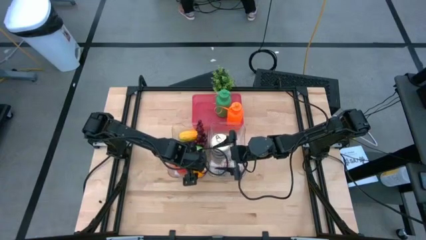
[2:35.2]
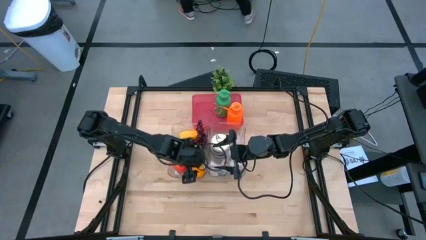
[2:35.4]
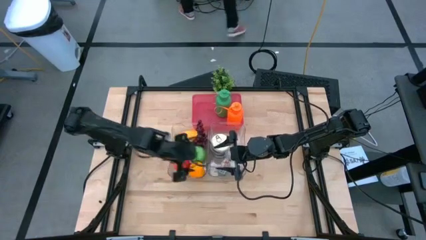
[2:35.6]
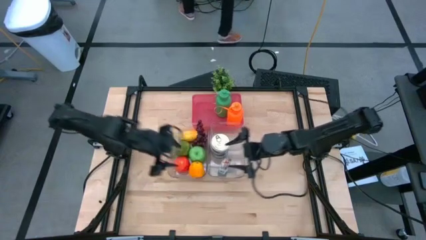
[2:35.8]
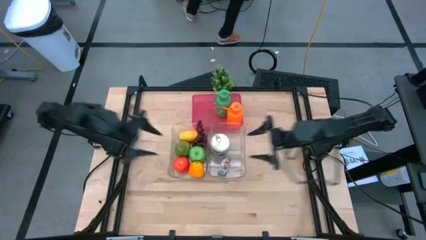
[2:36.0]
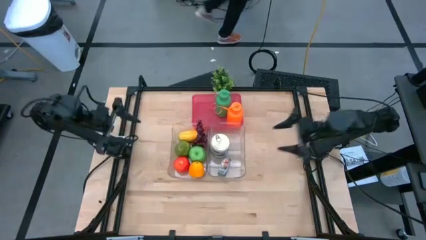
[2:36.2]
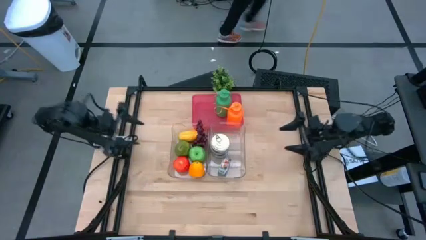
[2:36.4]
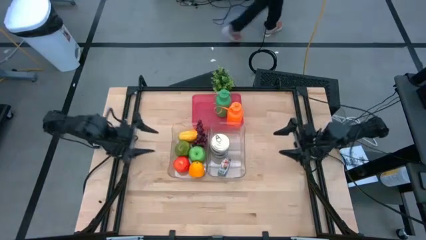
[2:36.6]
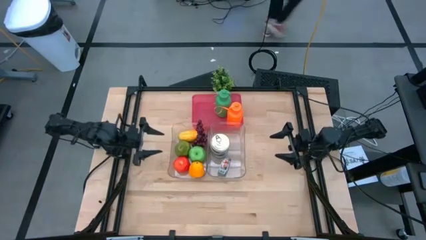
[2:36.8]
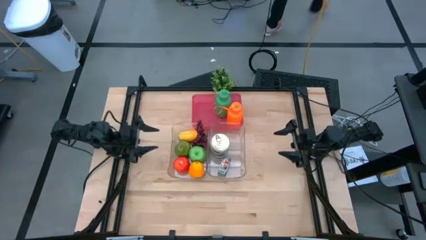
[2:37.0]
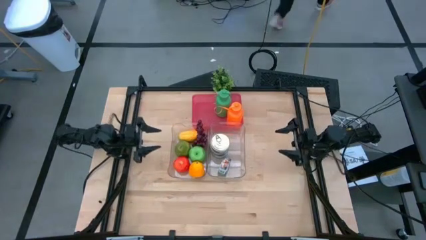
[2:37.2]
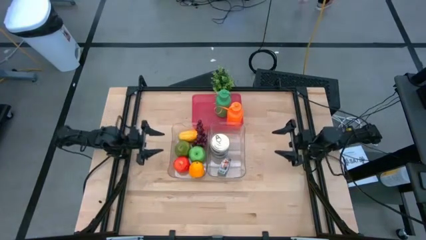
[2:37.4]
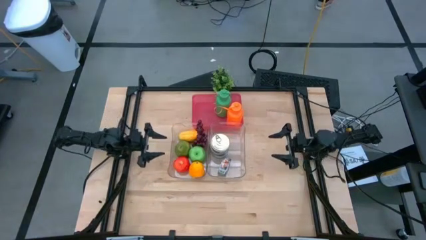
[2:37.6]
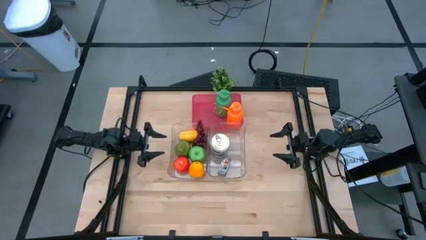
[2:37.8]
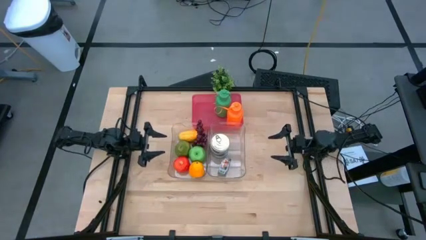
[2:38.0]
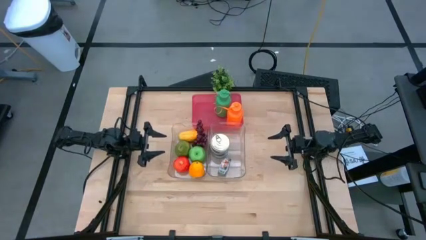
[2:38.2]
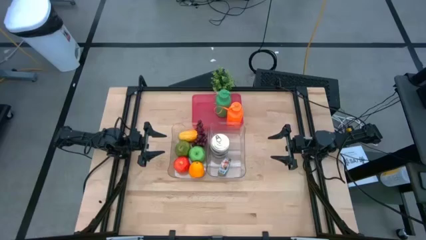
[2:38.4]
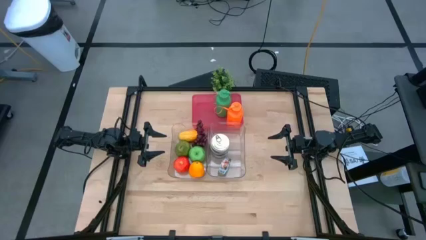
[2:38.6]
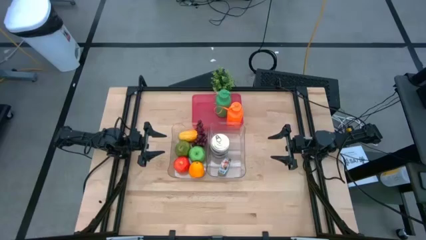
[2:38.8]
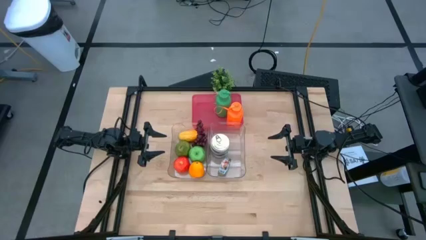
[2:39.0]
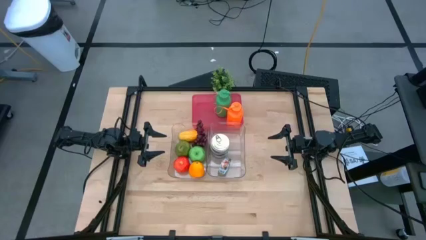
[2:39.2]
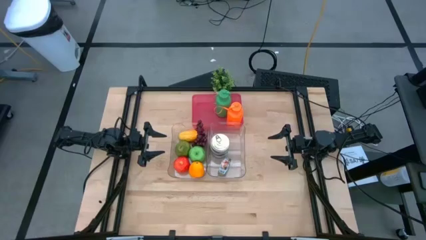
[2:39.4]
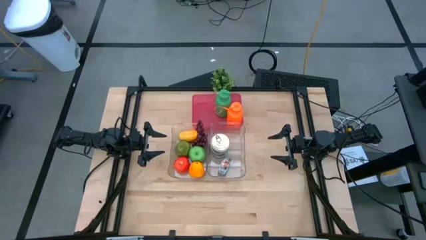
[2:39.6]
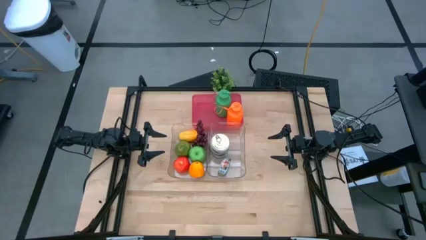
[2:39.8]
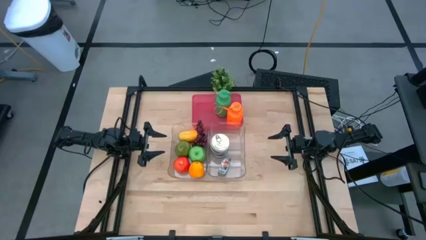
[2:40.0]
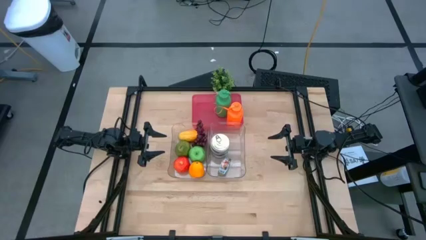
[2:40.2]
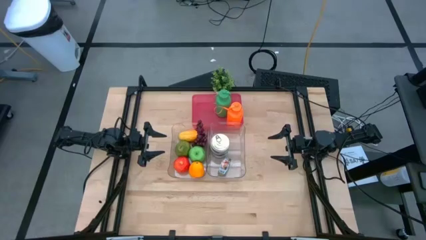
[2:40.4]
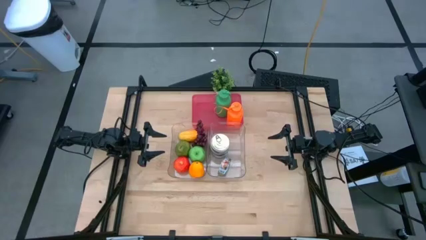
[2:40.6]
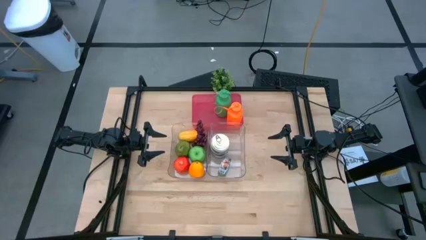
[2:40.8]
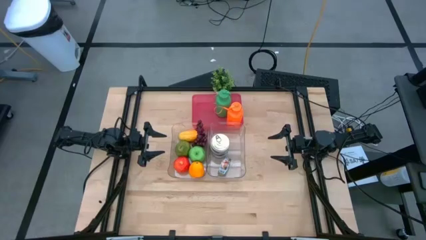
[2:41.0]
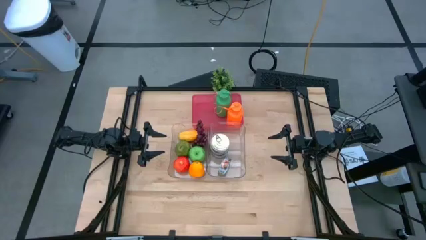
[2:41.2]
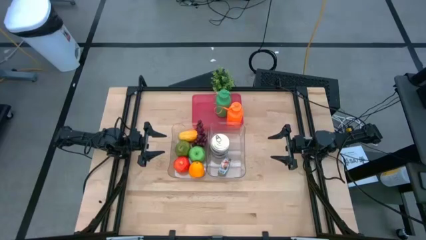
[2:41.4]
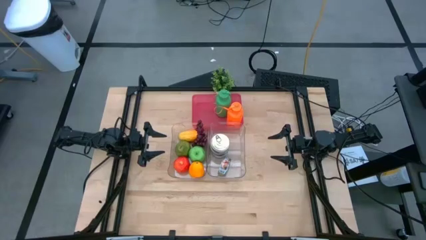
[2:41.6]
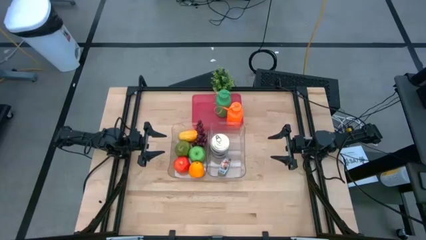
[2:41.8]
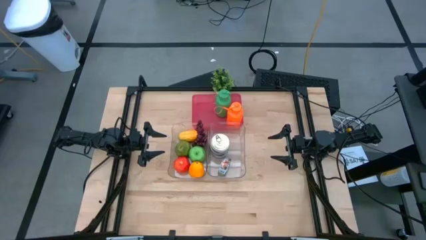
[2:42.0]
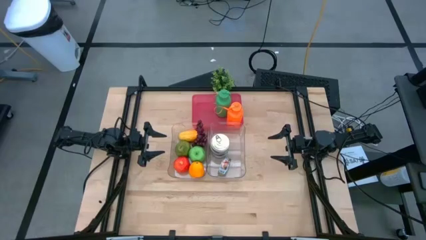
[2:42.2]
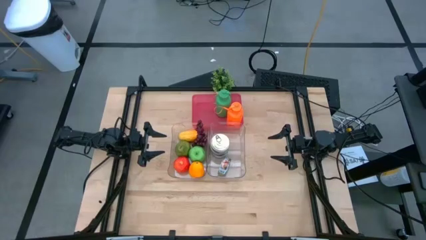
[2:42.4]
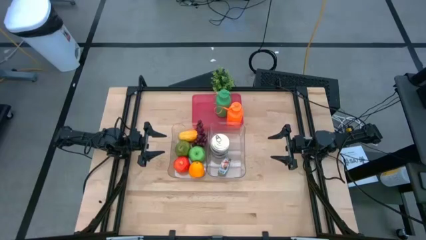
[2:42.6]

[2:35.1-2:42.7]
Task: Pick & Place Food Item
Return to Home Position

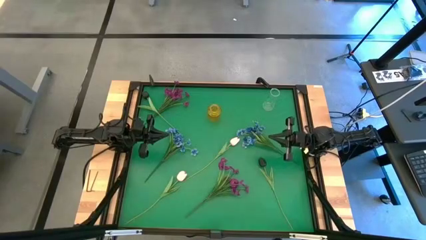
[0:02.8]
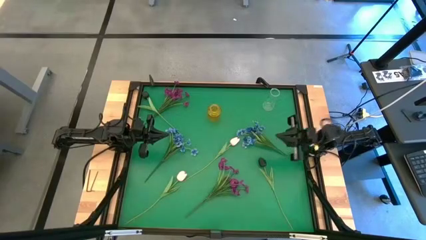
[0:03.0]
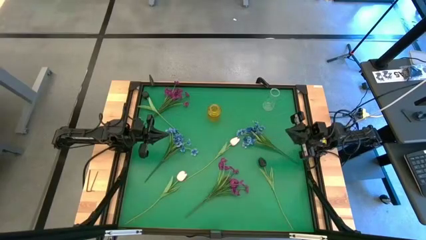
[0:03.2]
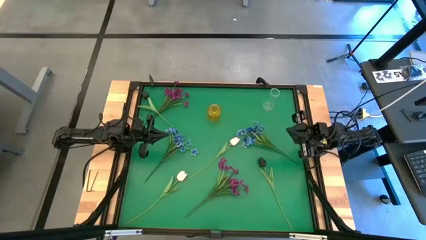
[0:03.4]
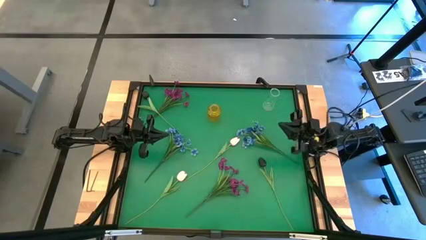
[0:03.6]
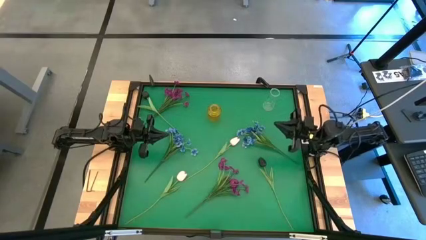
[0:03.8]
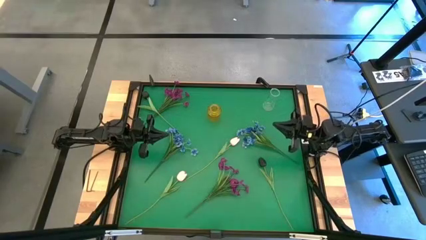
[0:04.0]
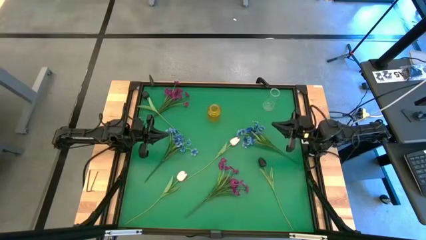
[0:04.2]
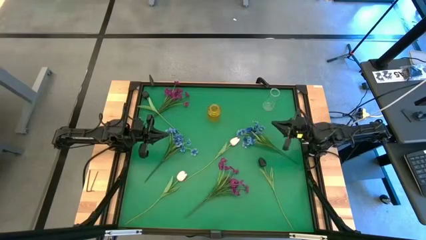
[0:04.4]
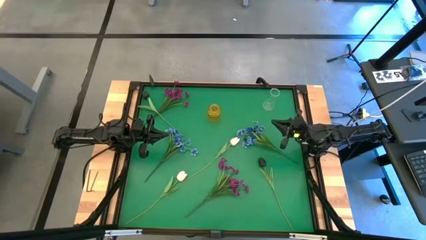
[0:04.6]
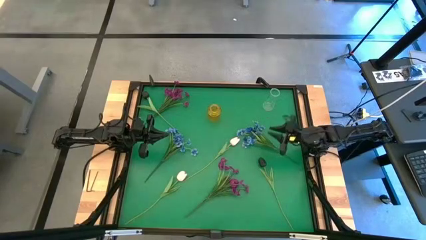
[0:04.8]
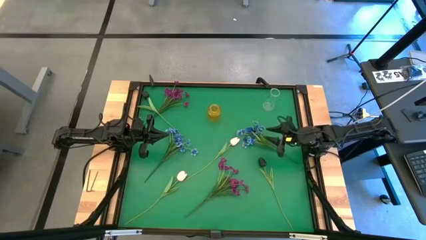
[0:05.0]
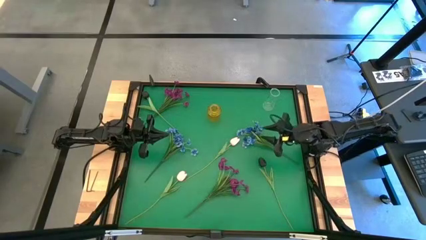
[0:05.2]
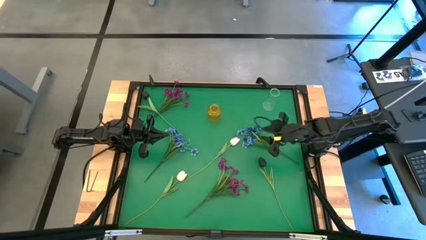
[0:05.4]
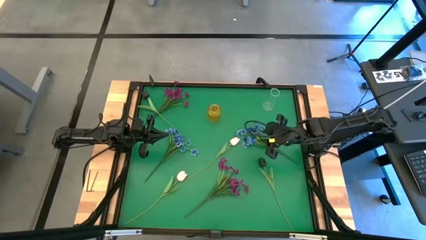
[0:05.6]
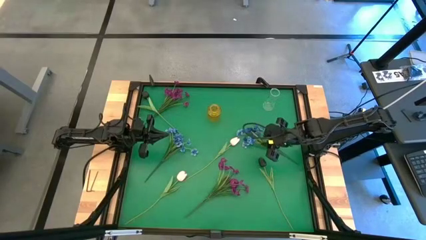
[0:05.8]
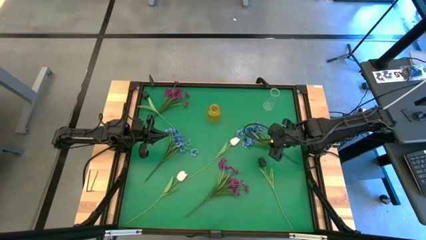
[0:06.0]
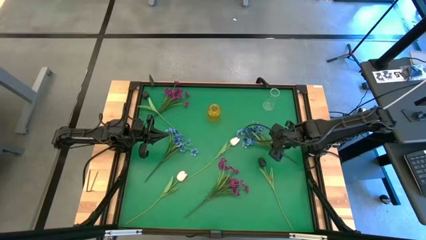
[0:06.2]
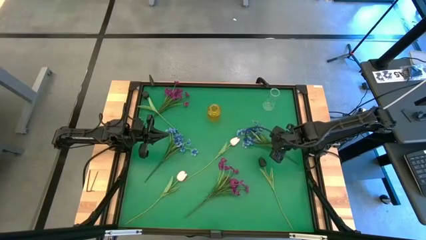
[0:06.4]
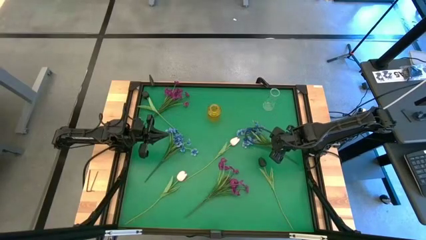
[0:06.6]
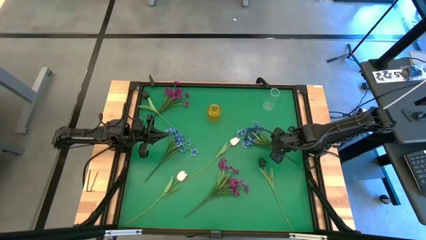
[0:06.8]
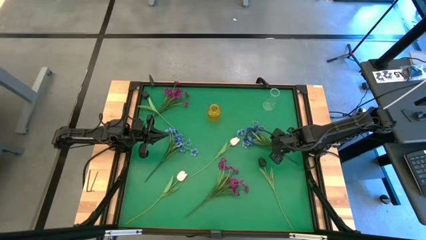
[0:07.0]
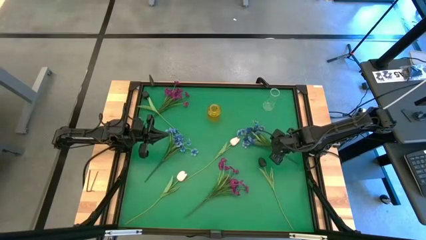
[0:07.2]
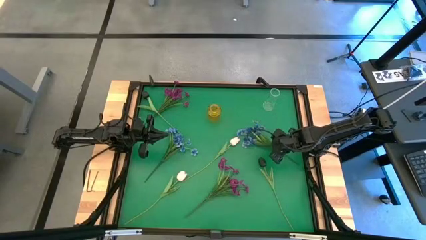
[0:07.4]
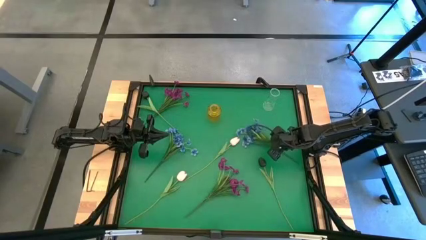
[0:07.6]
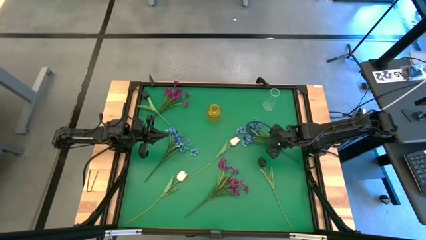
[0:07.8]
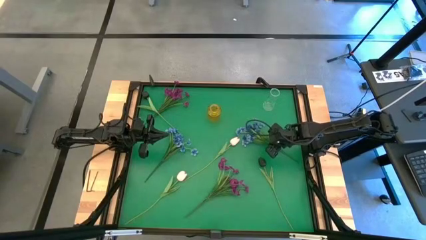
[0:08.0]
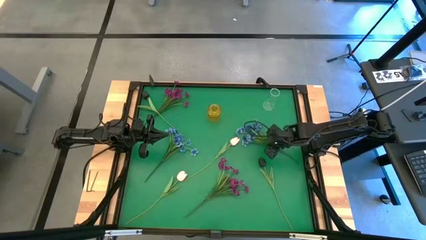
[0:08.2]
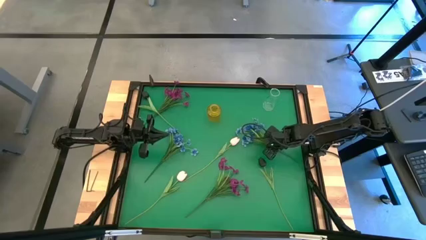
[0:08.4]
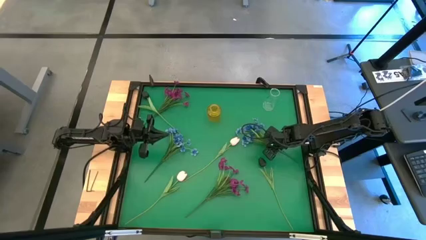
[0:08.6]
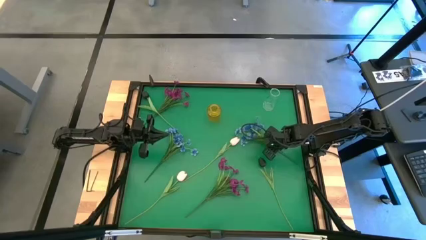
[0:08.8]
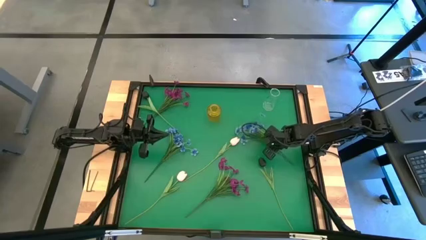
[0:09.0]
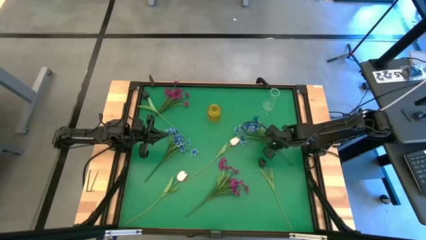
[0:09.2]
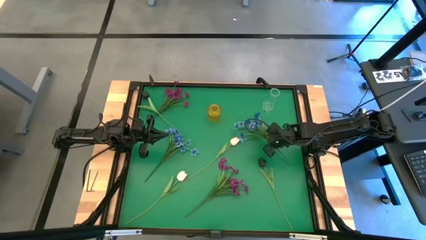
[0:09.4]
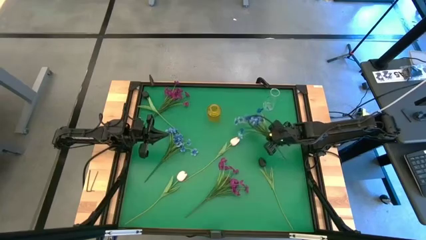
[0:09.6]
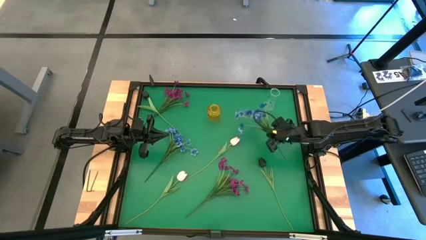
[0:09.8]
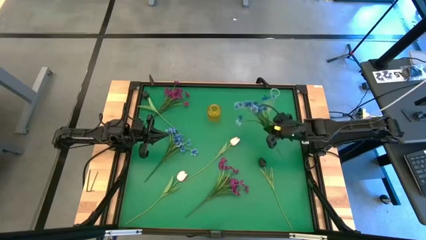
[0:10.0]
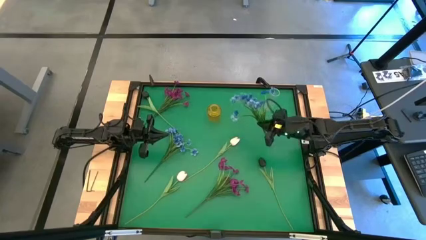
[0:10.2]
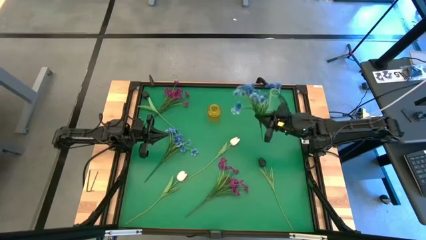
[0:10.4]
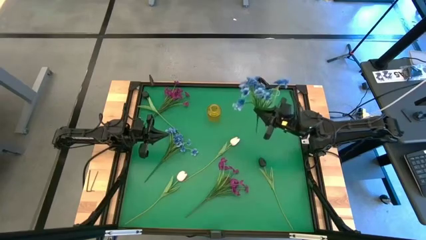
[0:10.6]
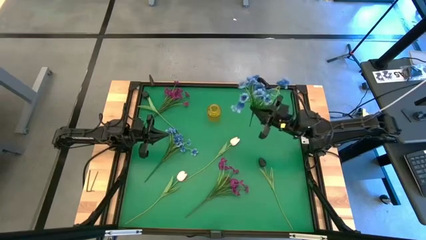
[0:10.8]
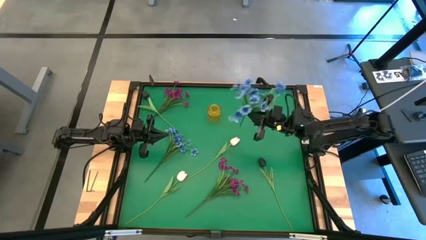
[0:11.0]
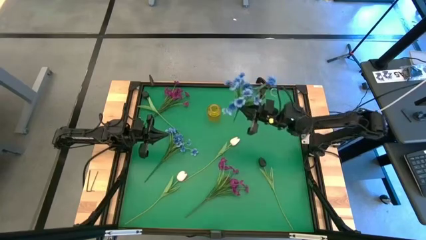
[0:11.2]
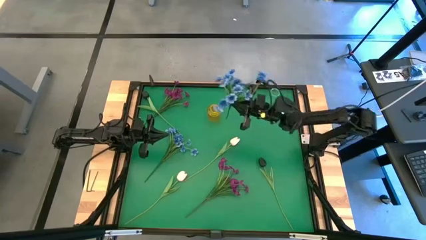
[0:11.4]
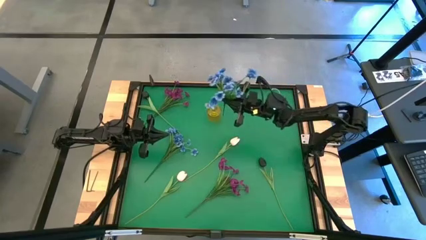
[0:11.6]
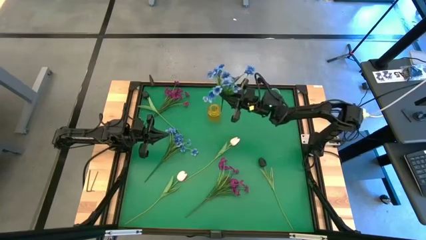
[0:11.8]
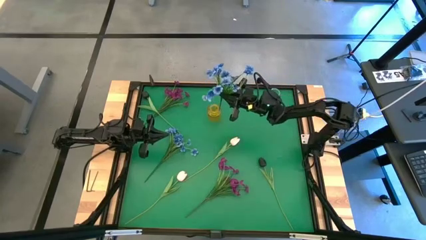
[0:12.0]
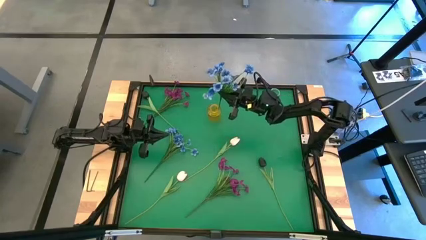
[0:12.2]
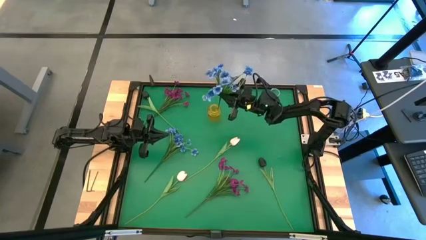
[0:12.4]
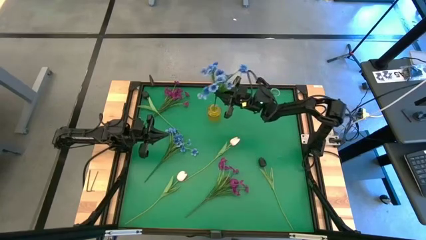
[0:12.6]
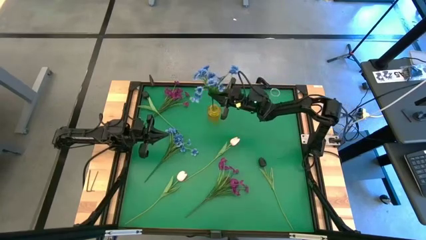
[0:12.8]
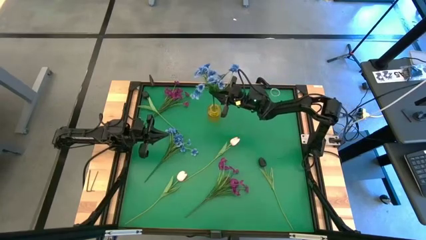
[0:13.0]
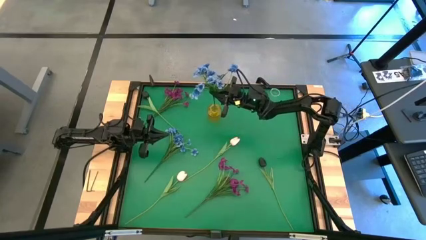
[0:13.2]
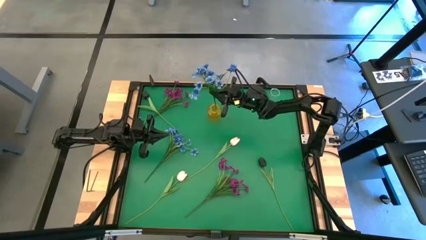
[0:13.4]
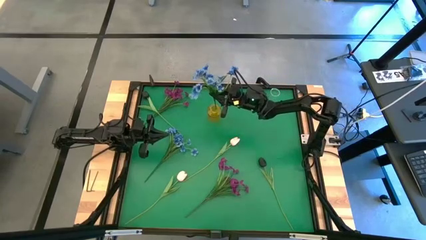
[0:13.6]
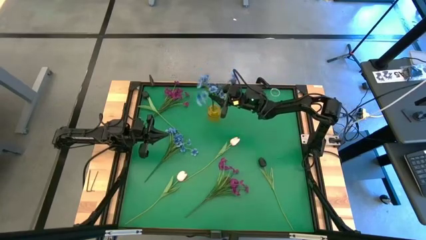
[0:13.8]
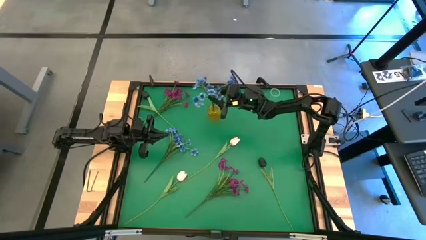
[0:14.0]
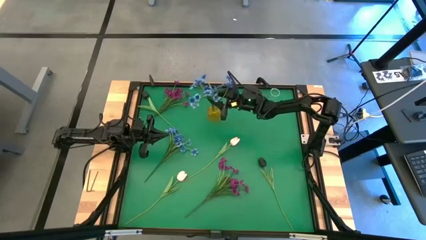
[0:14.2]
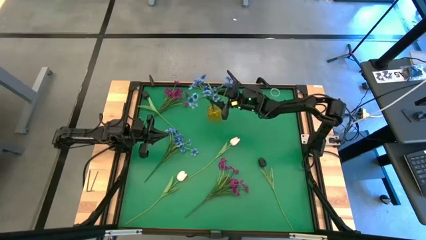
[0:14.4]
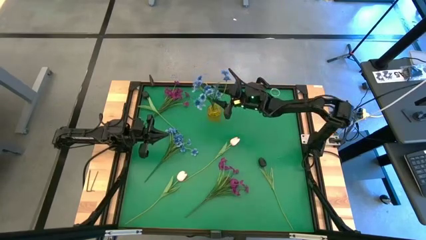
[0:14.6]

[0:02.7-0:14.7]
Task: Sort flowers into vase by color
Put the right blue flowers into the yellow vase
